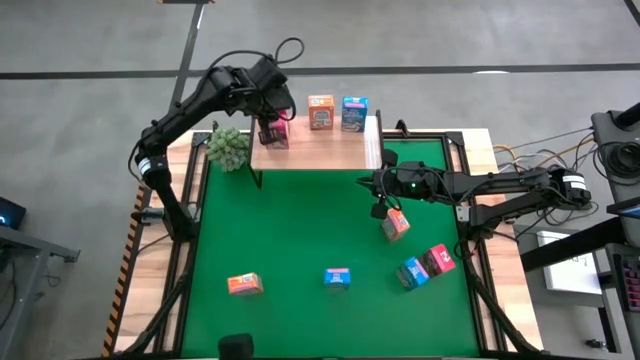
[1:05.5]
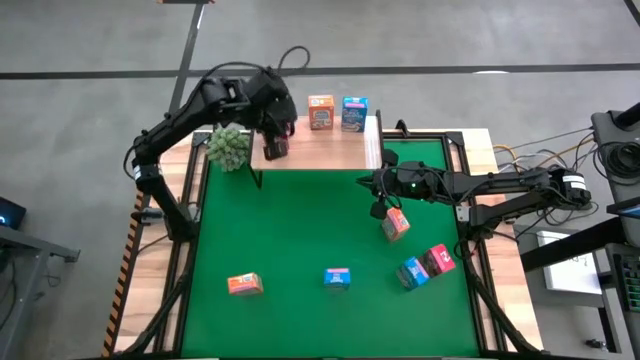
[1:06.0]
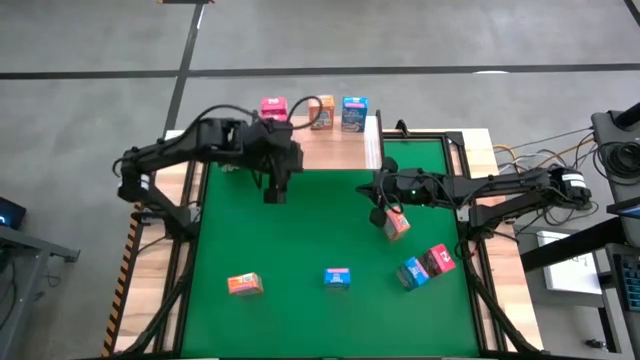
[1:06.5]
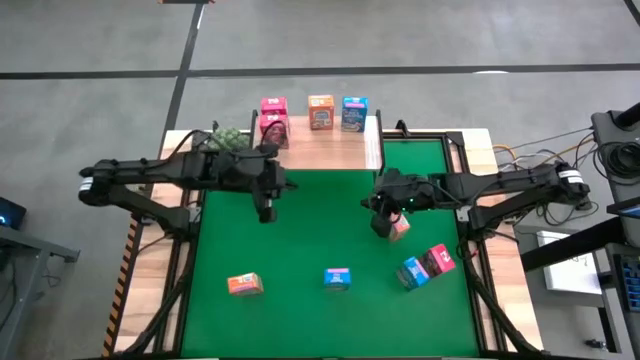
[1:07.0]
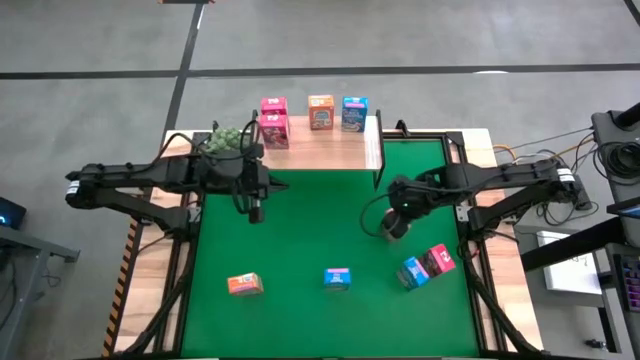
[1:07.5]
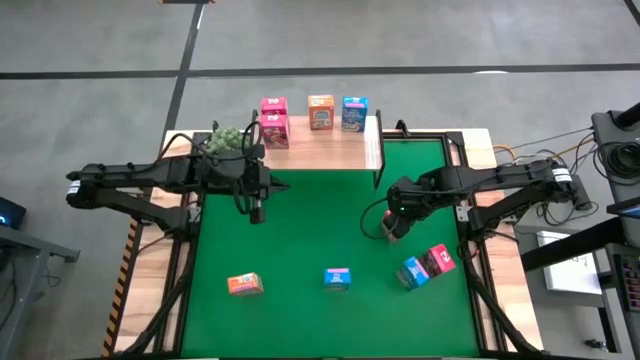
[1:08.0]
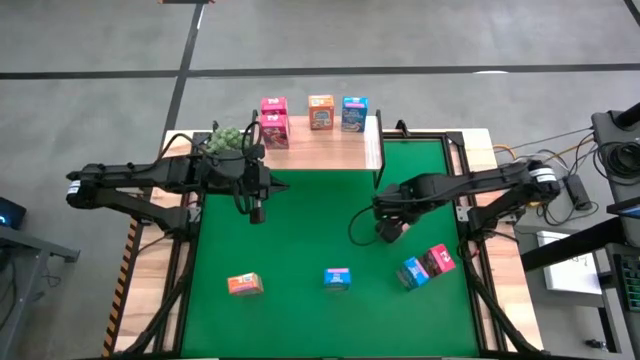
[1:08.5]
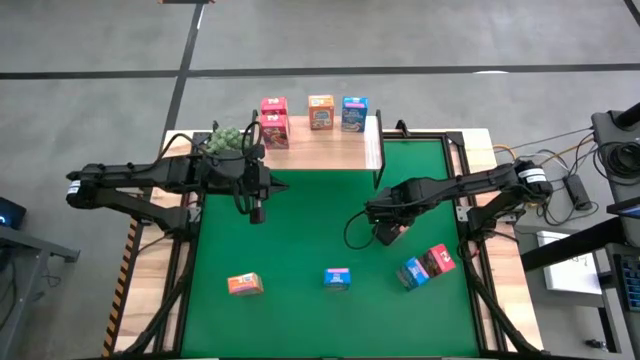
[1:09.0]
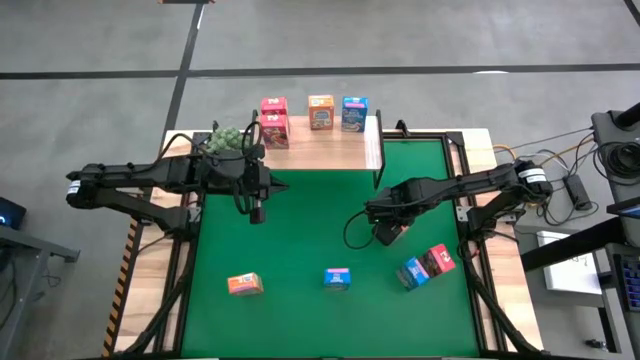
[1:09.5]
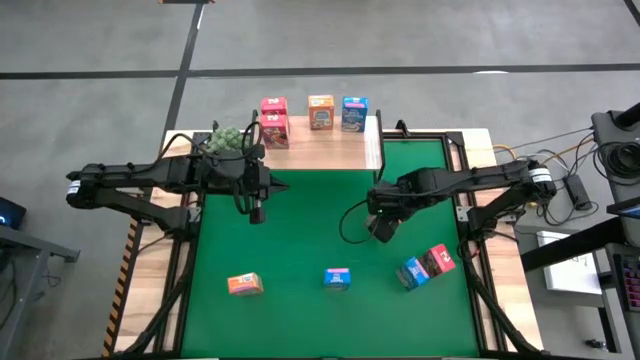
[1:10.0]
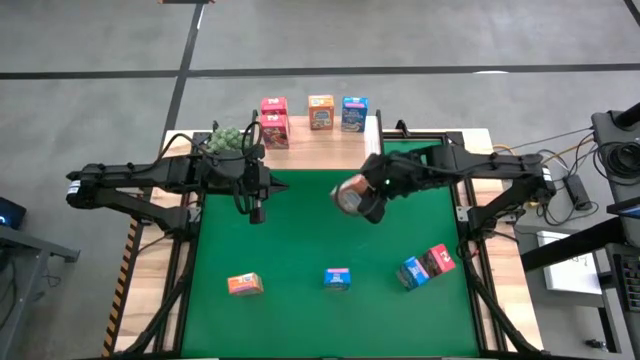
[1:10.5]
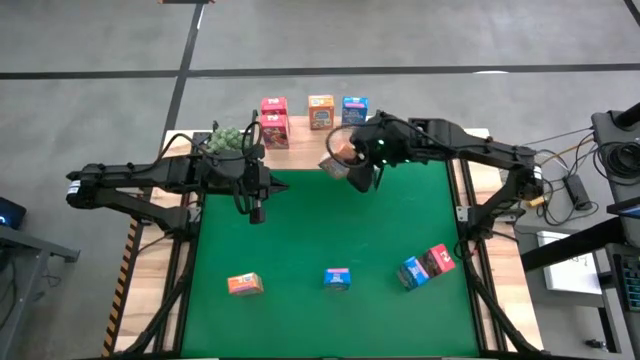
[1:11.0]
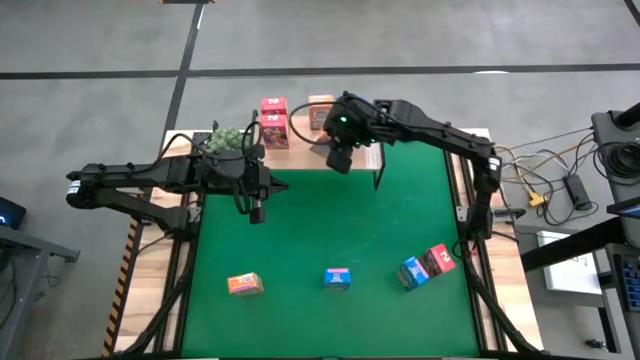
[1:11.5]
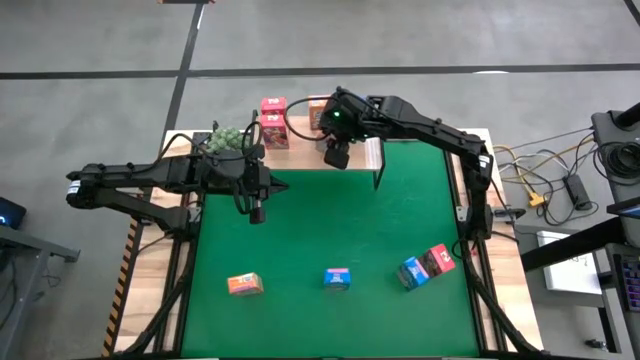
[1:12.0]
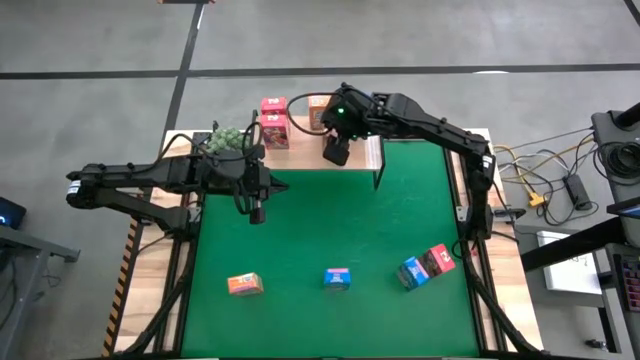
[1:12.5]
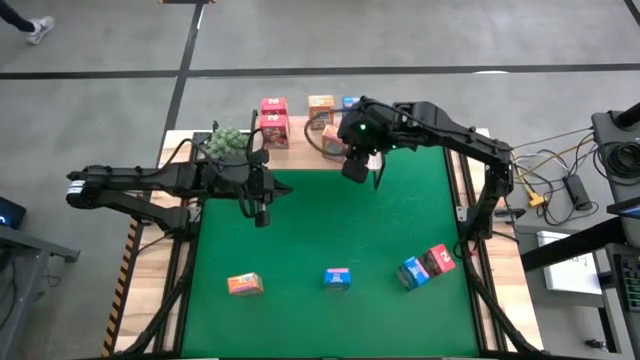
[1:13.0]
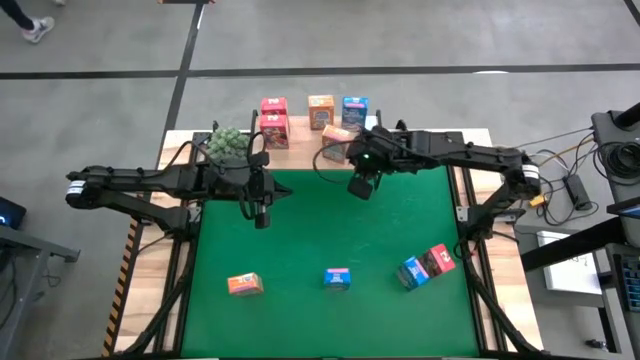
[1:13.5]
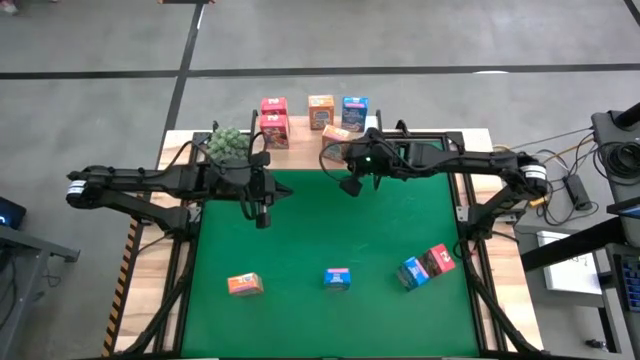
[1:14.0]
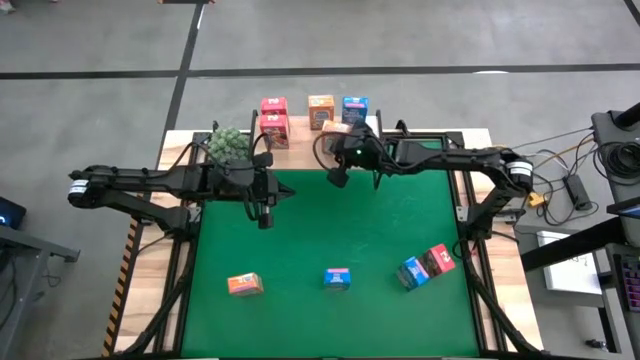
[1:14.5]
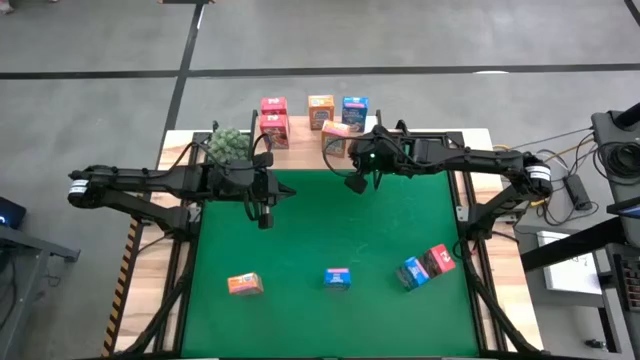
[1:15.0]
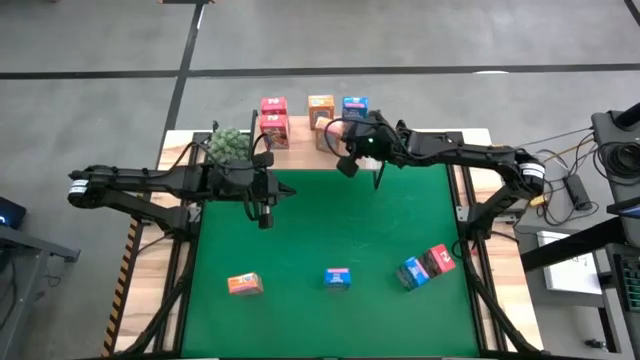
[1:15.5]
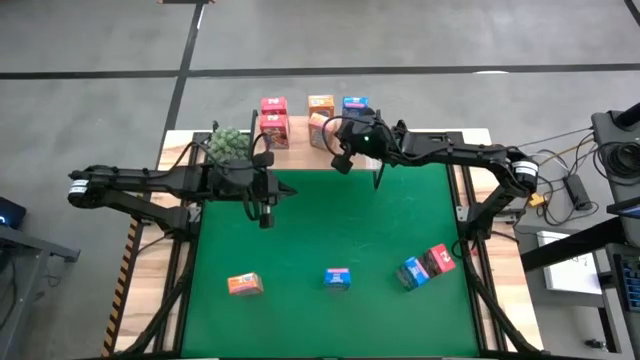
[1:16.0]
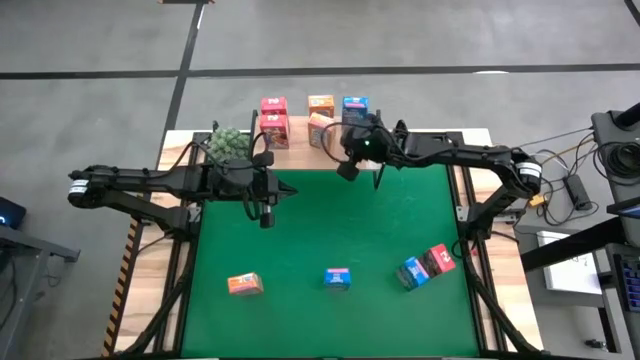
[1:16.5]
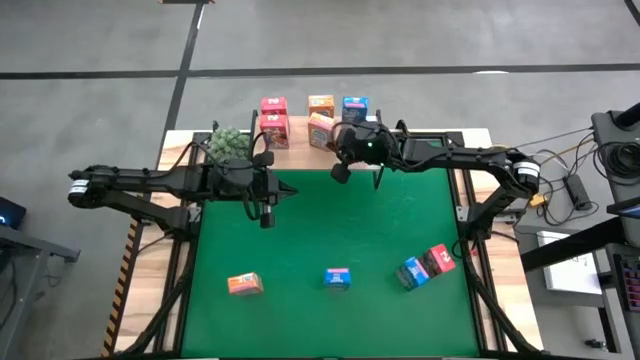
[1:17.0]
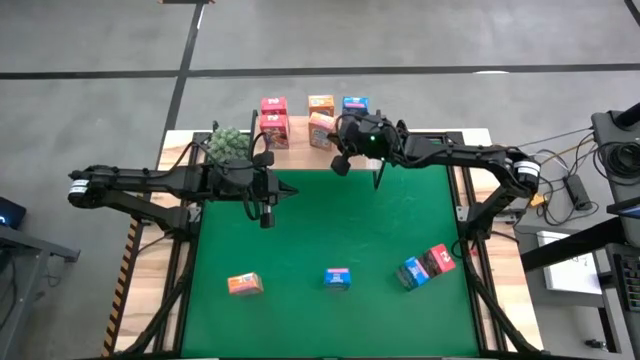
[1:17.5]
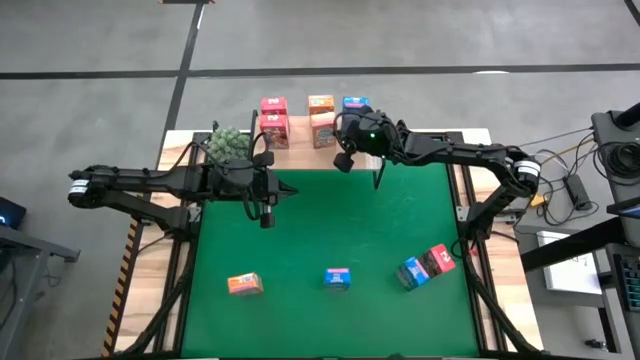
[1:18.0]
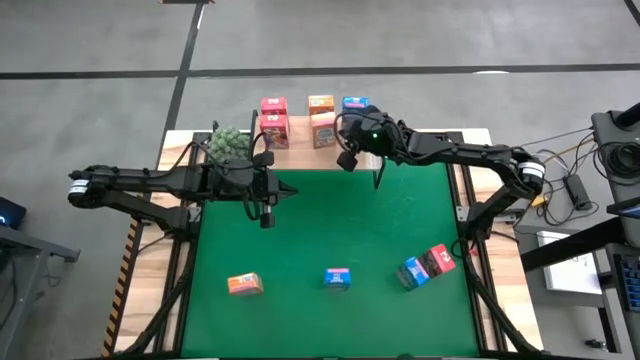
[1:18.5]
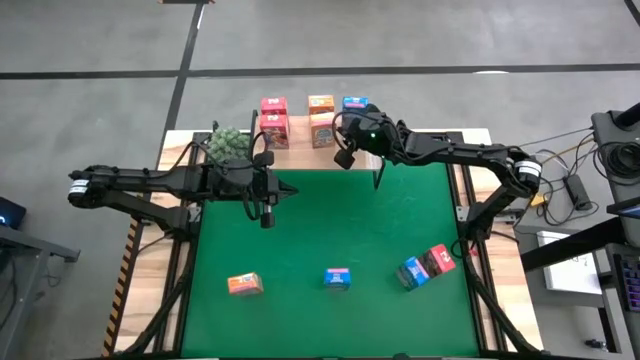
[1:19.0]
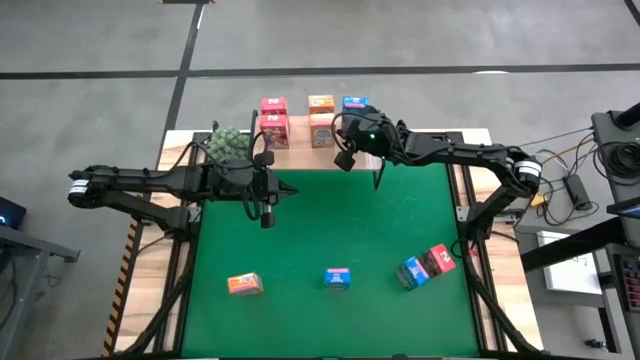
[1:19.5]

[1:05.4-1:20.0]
Task: Stack cereal on shelf
Put the right orange cereal box on the shelf aligned with the other orange cereal box

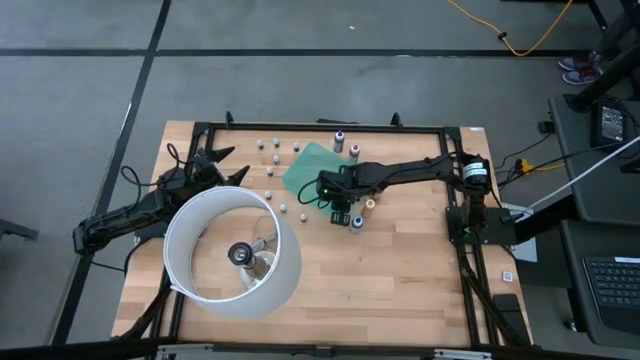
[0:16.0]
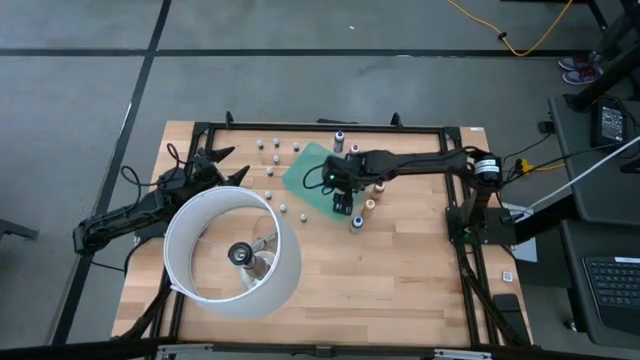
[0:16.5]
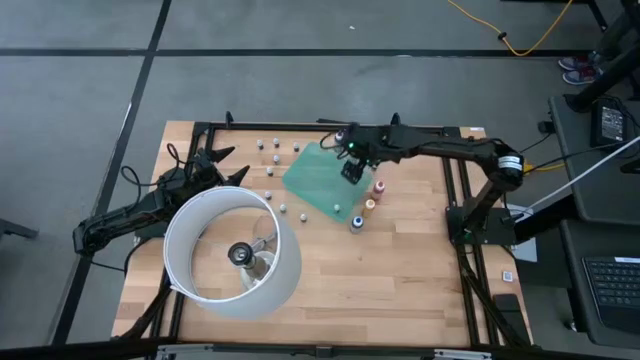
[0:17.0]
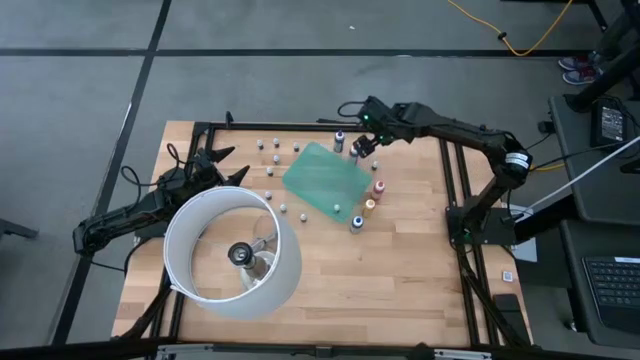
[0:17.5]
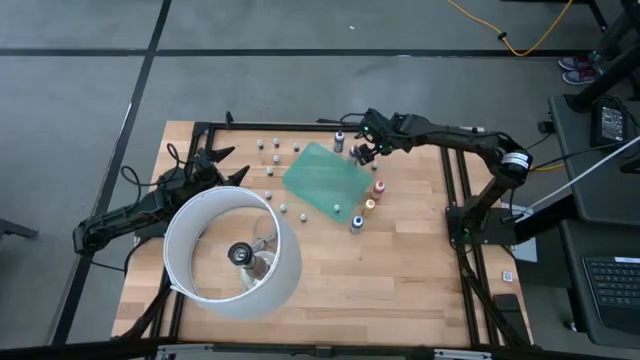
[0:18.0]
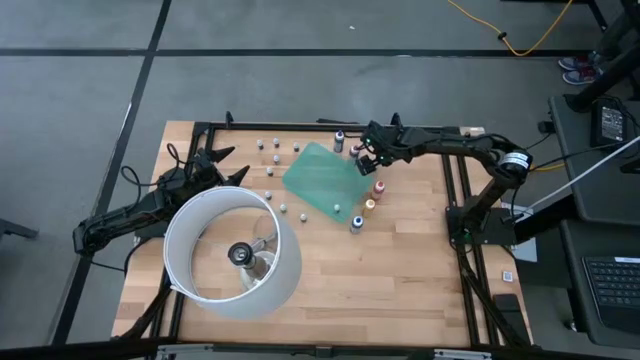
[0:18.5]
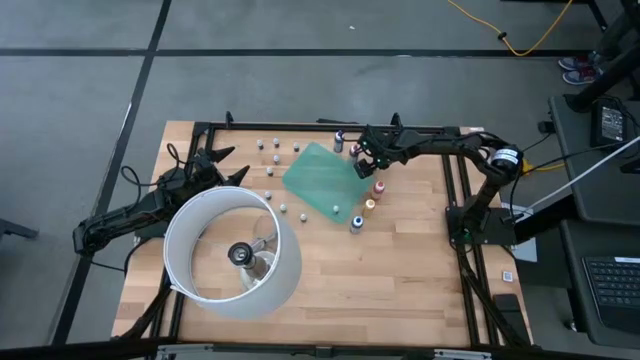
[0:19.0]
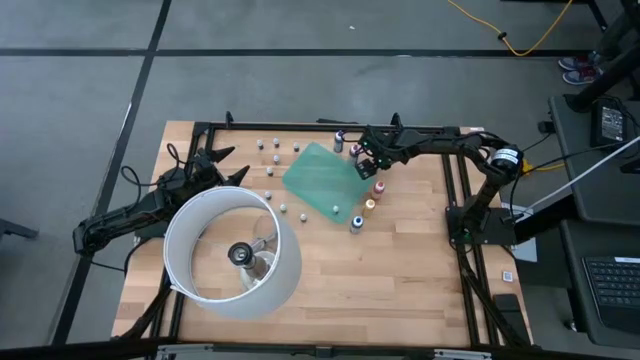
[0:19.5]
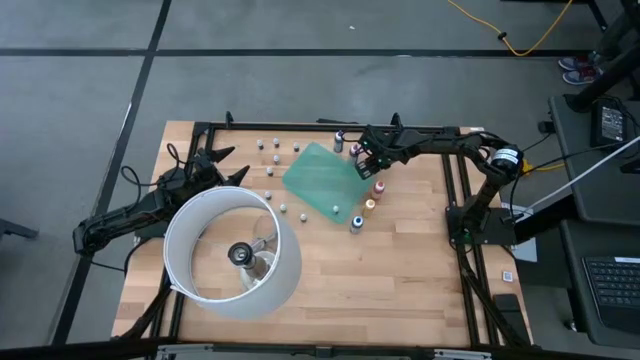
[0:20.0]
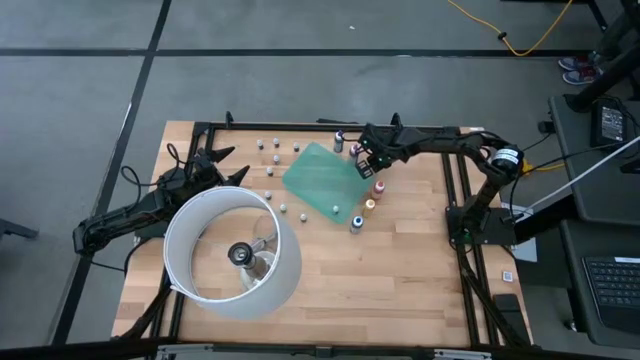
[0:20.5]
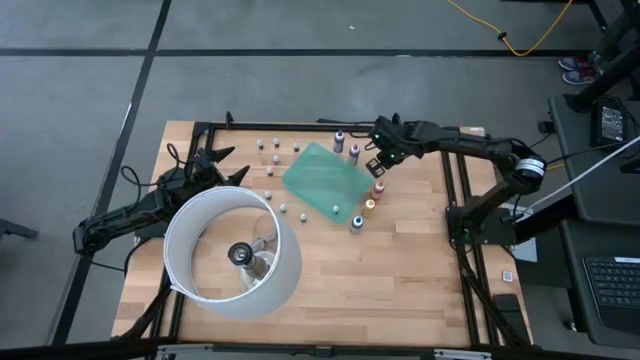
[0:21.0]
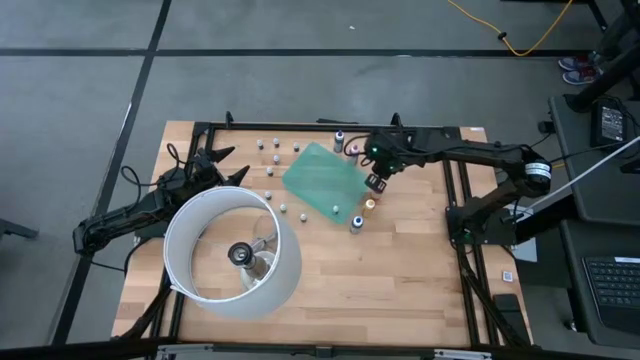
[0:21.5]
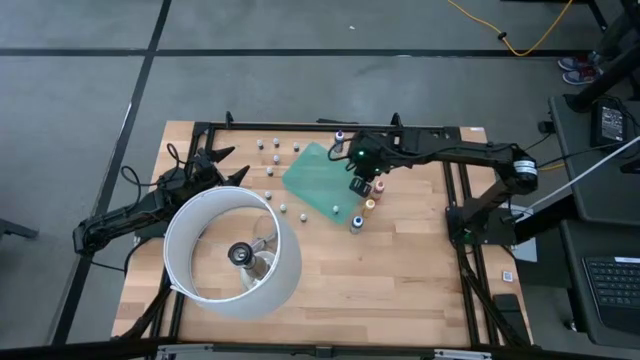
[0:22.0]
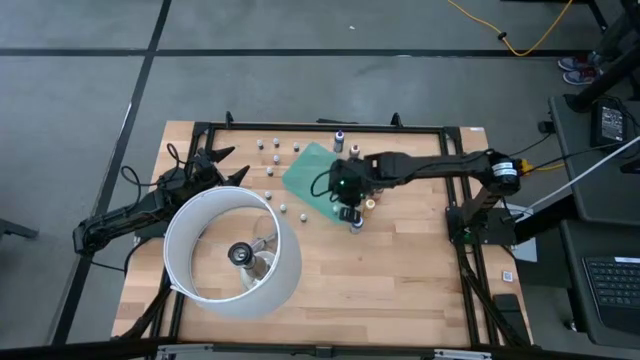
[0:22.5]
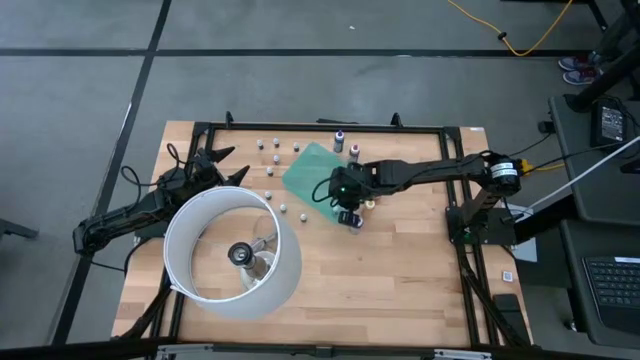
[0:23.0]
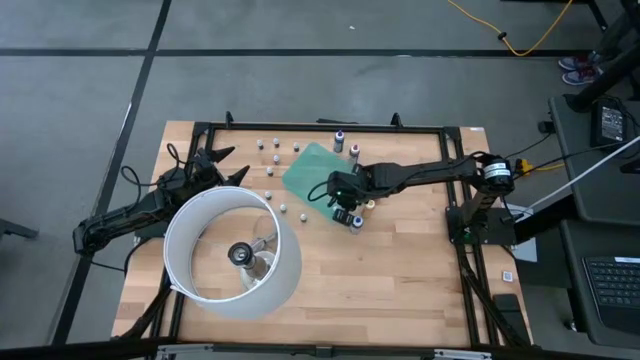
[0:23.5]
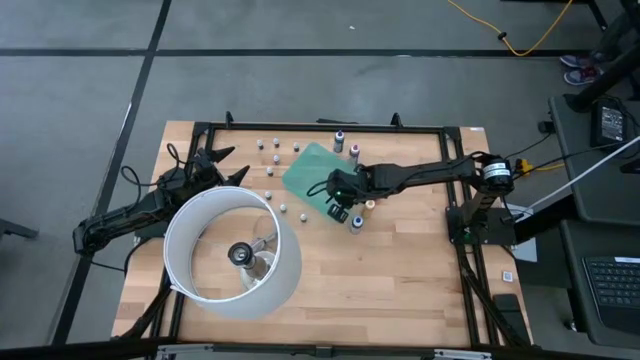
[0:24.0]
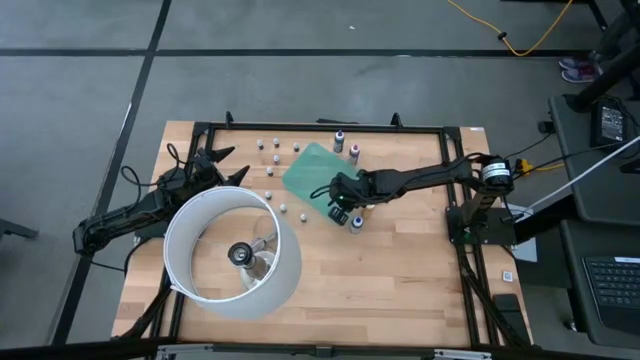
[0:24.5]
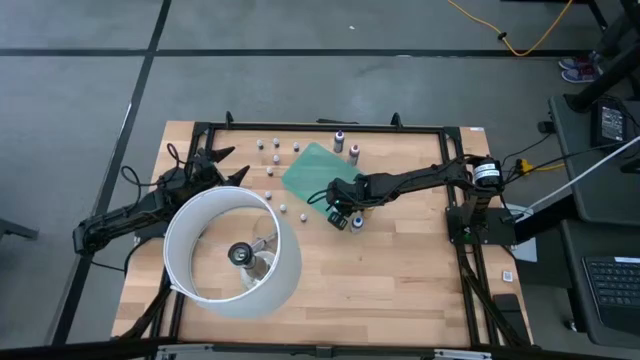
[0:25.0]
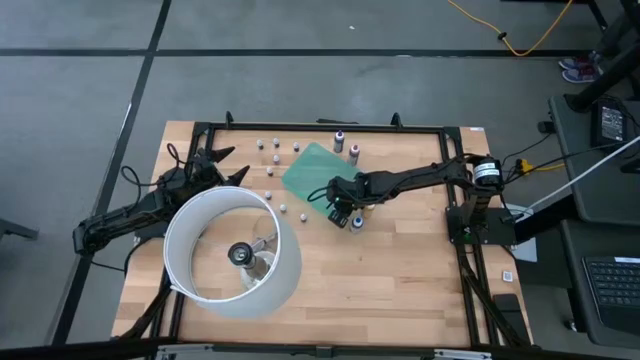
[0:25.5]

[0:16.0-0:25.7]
Task: Pick & Place food coloring
Put the small black food coloring bottle into the green bin
